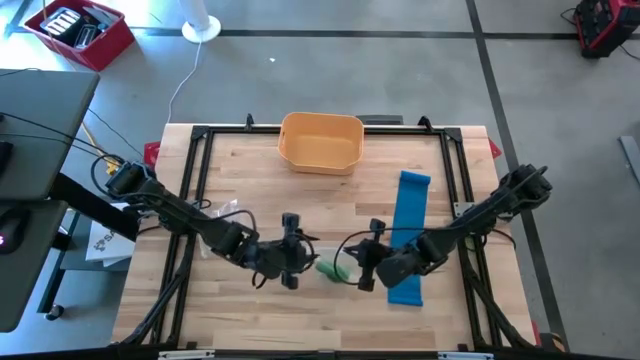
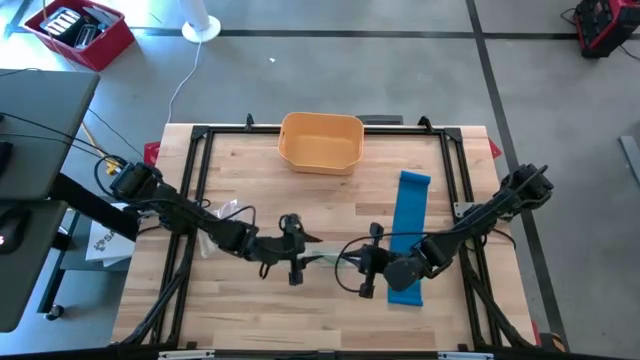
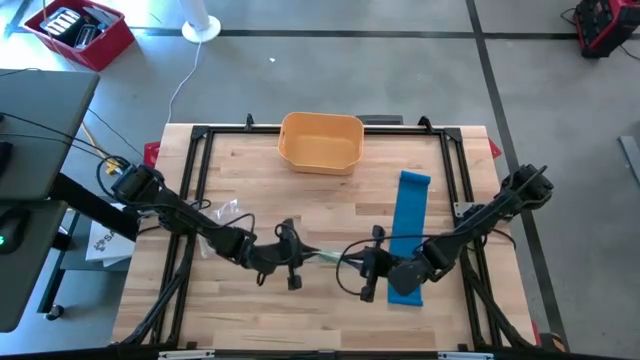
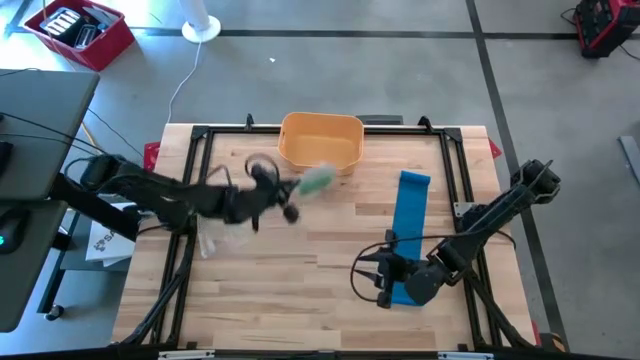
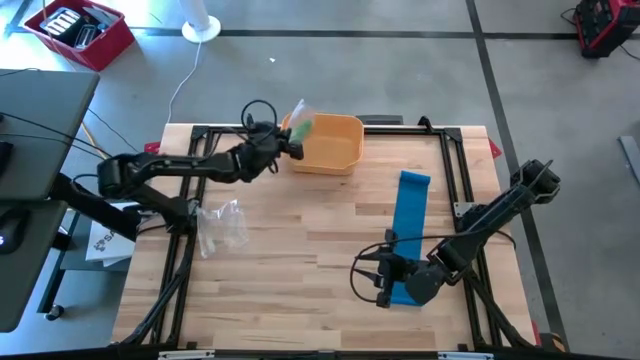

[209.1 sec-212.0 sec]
Task: Roll bandage
Put the zip bag into the yellow bin

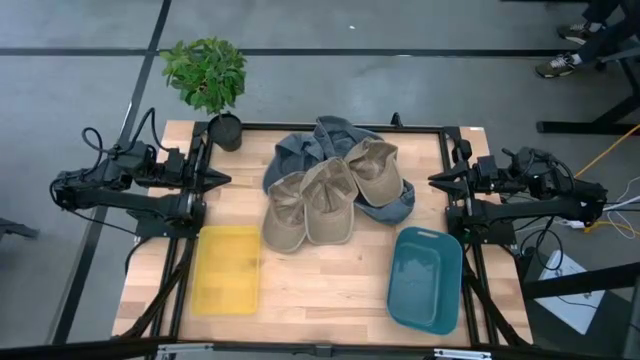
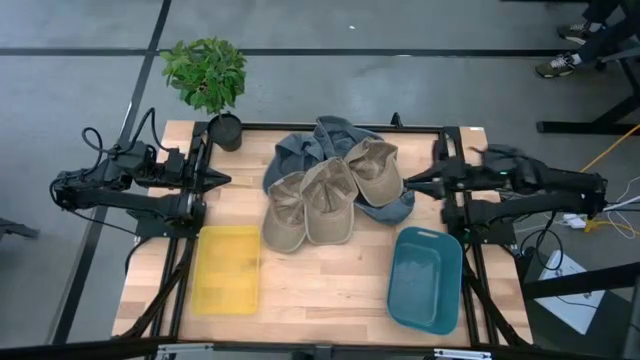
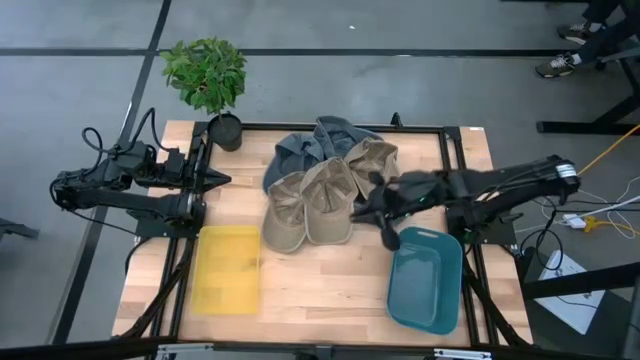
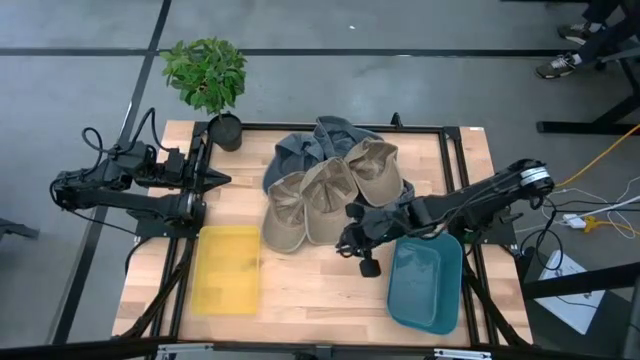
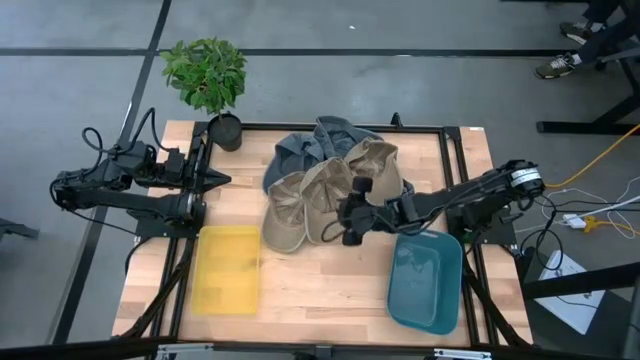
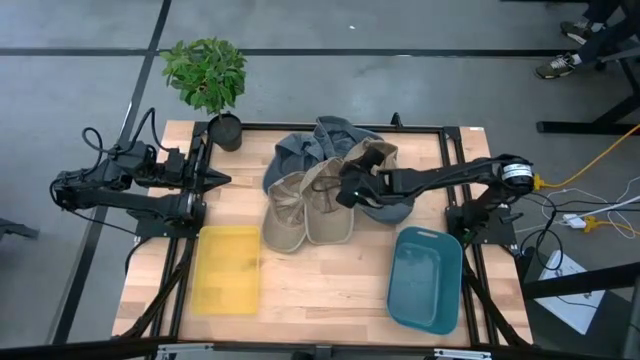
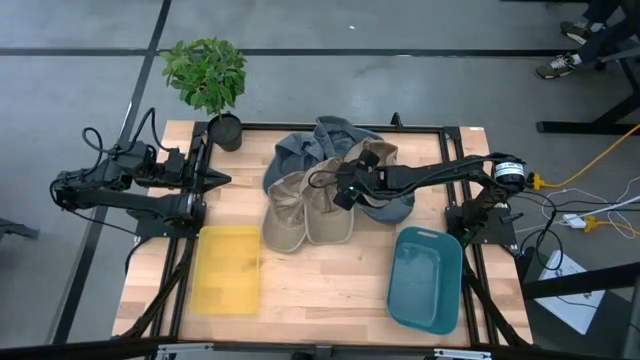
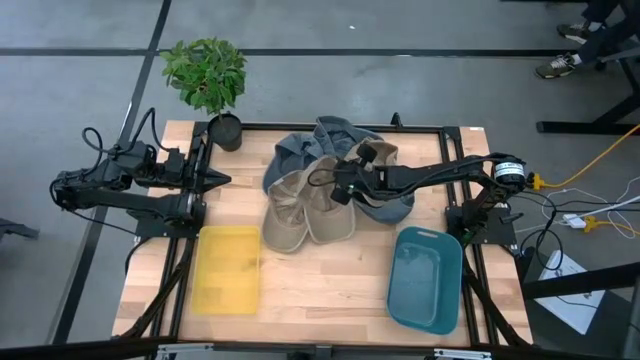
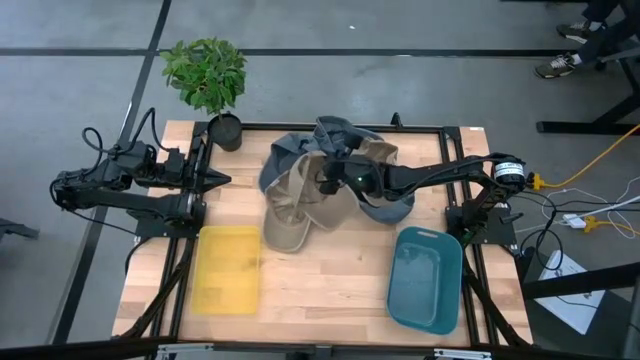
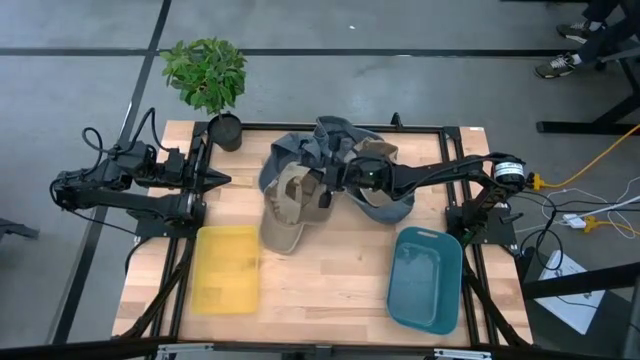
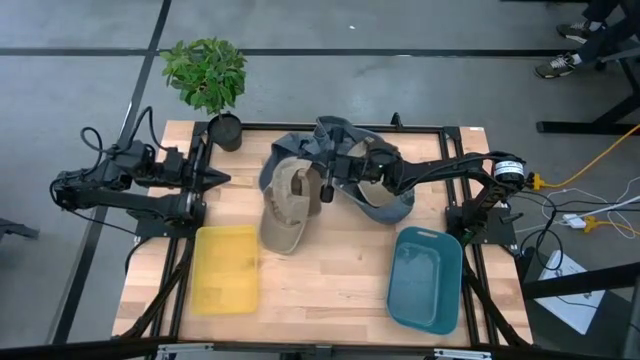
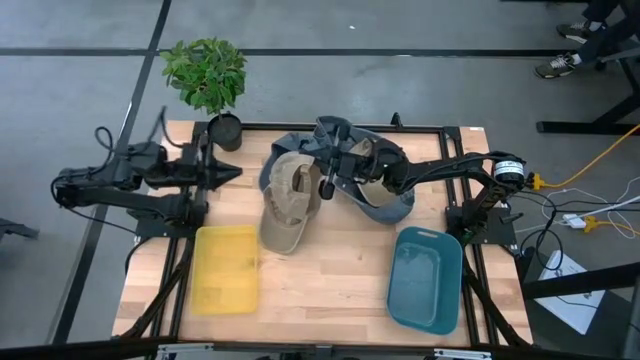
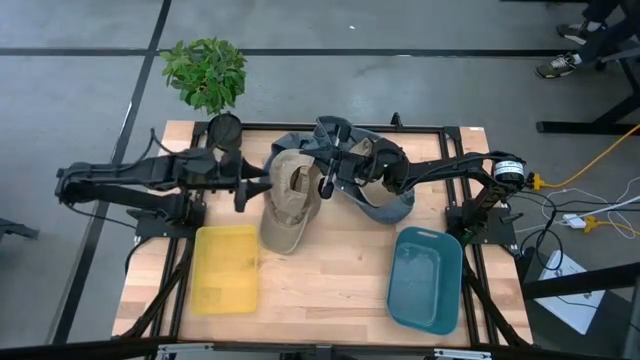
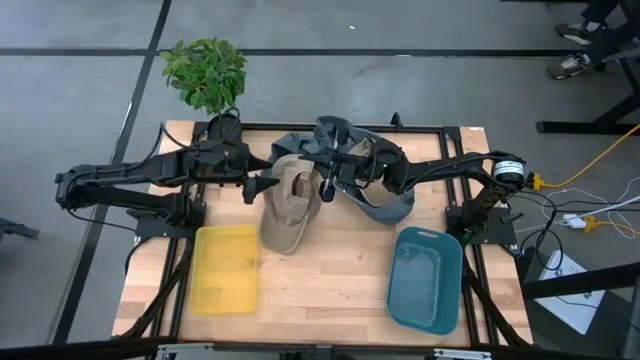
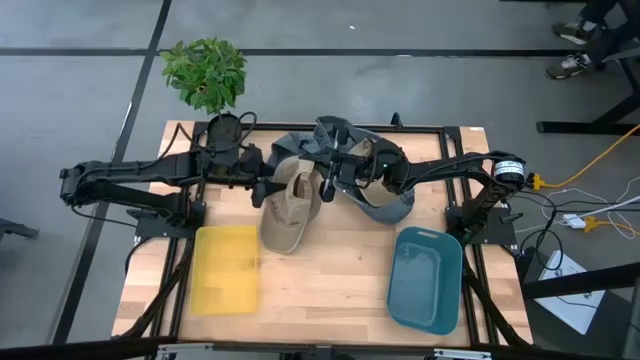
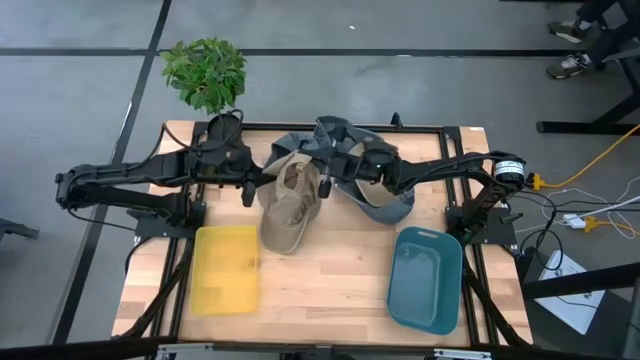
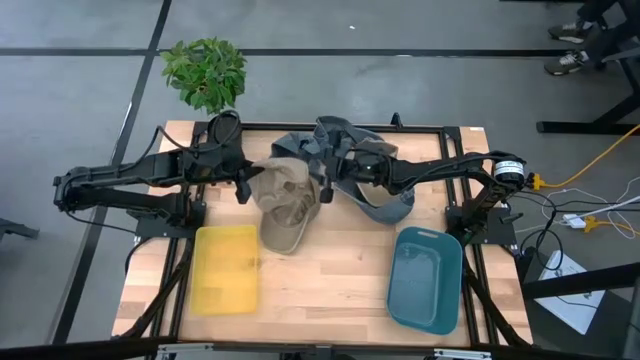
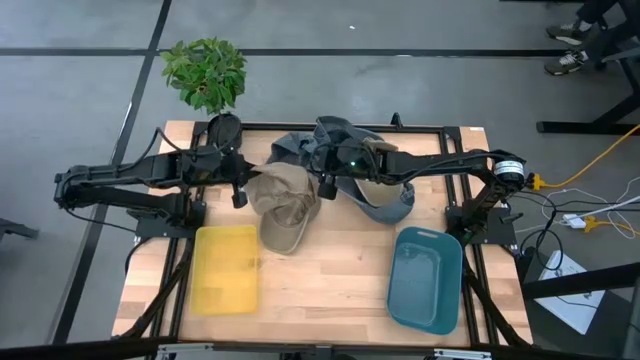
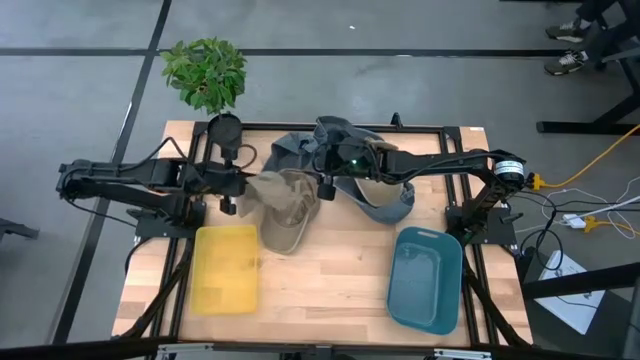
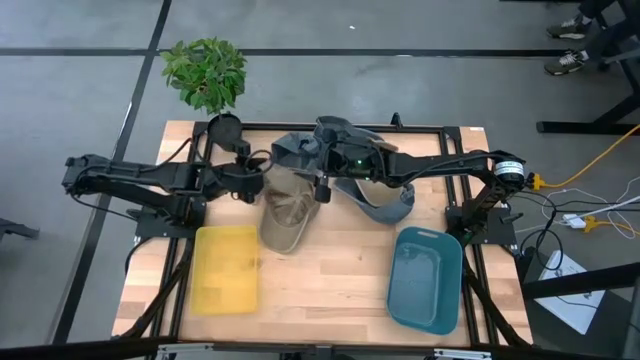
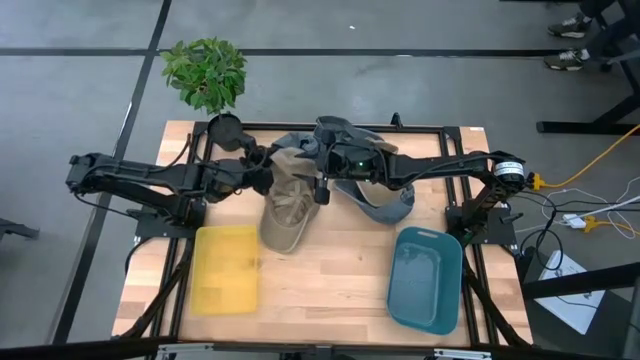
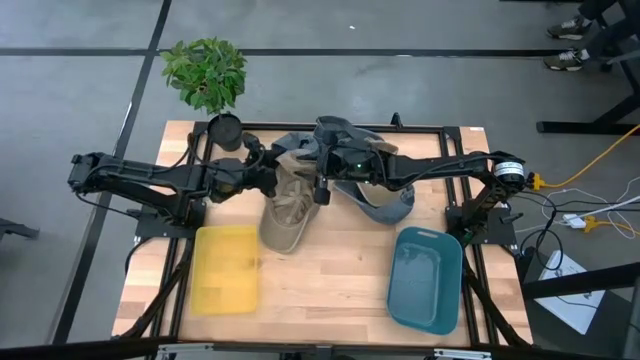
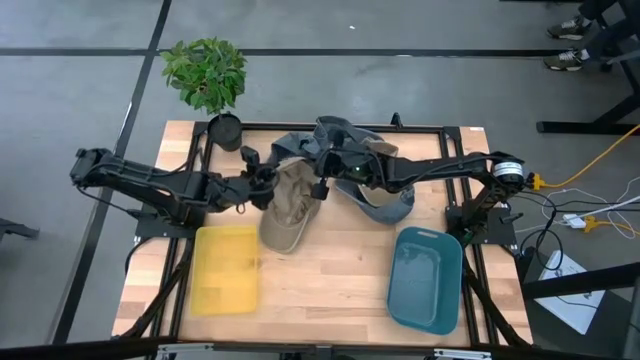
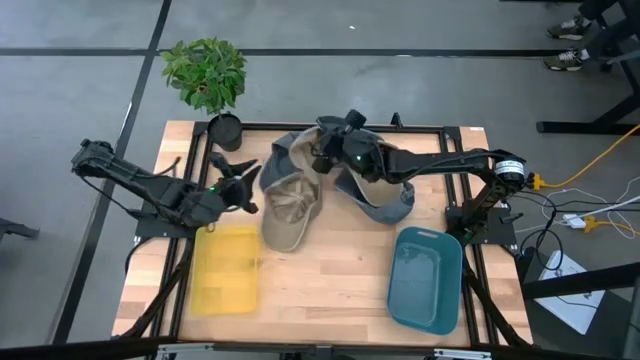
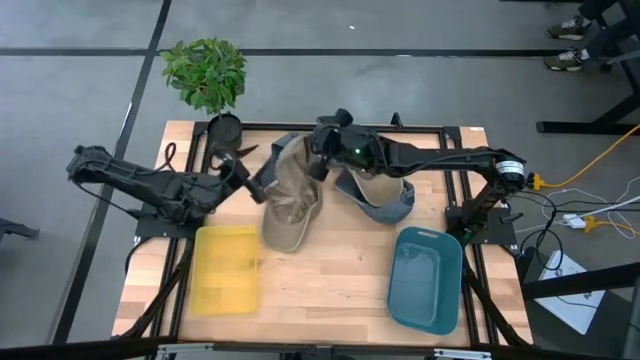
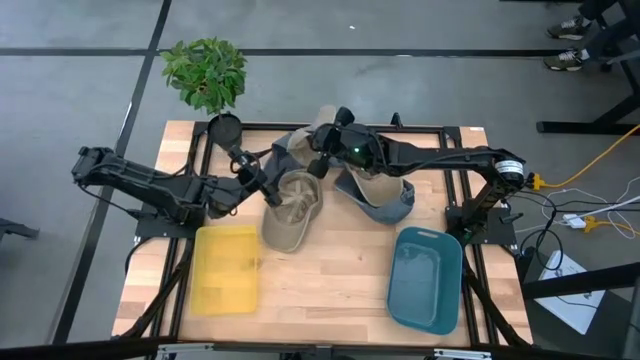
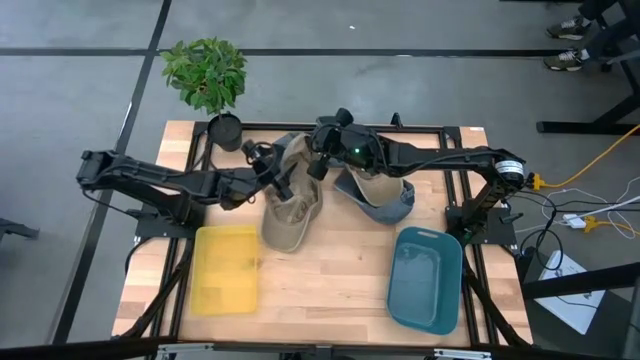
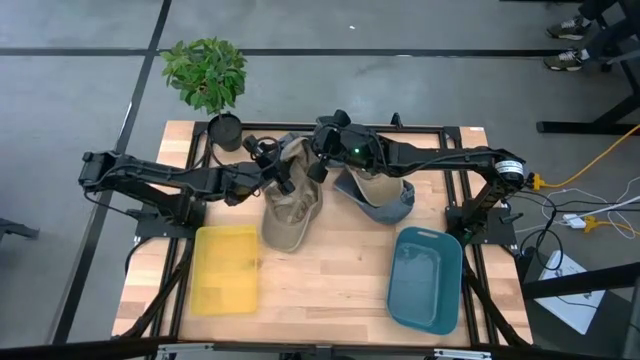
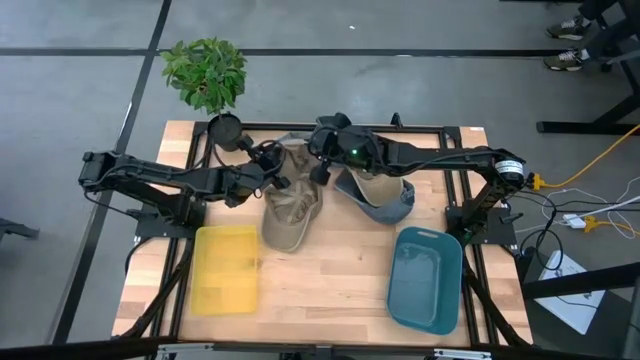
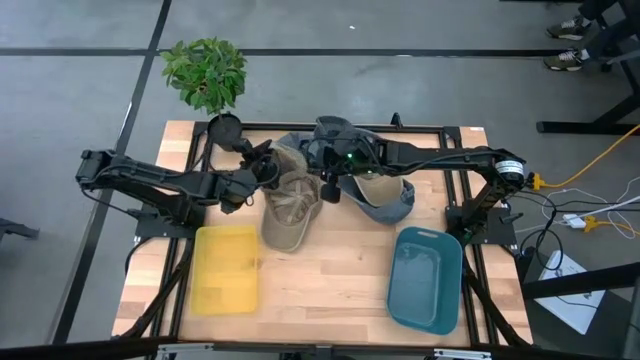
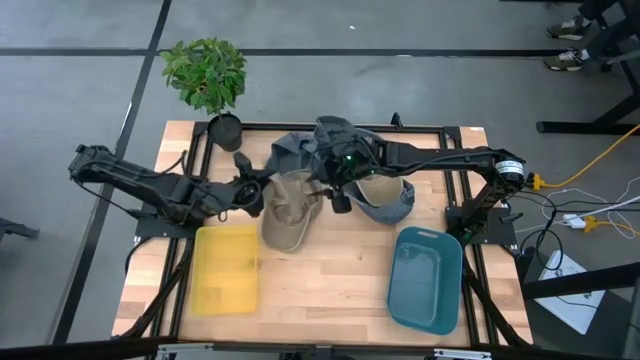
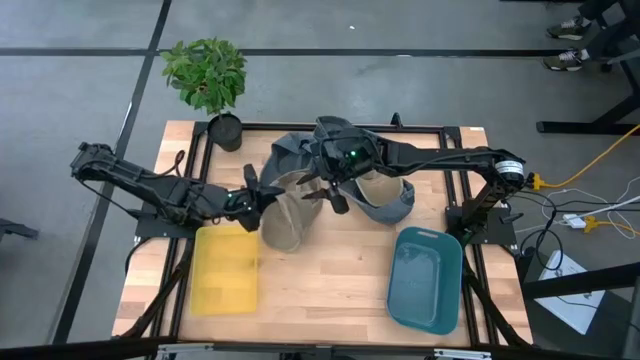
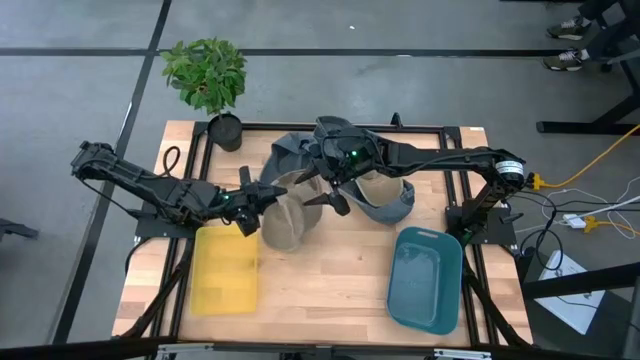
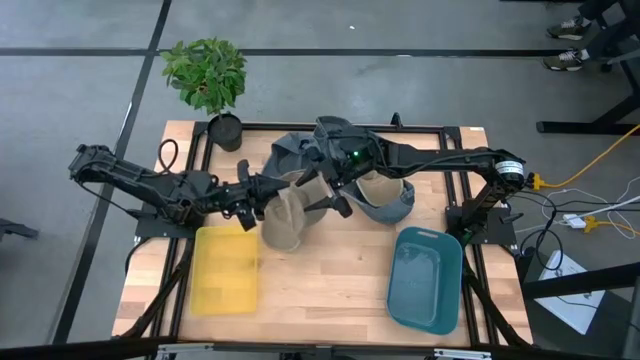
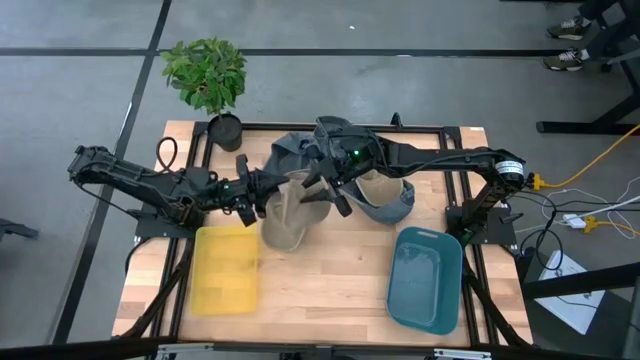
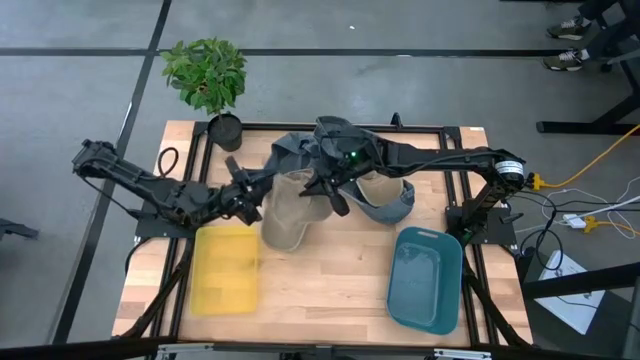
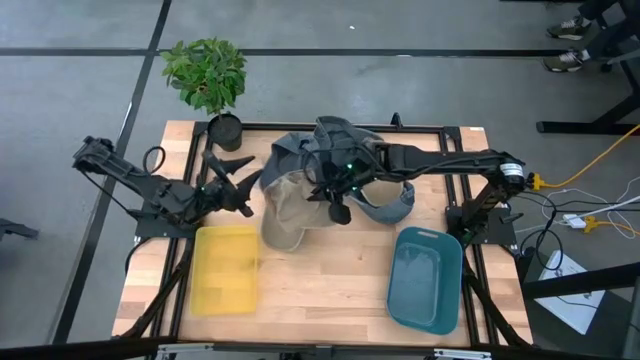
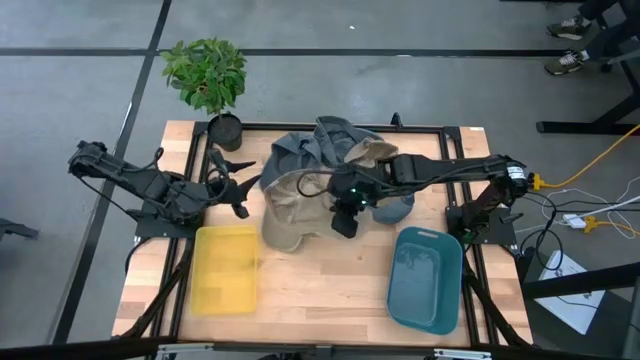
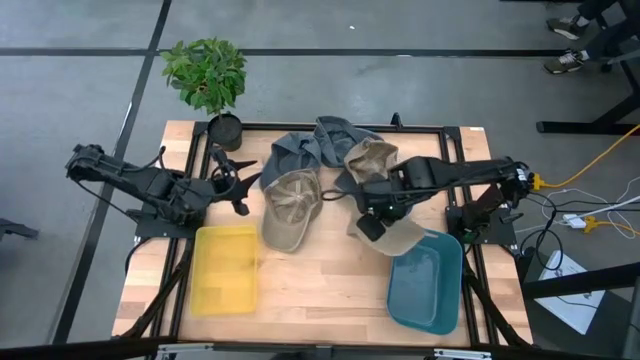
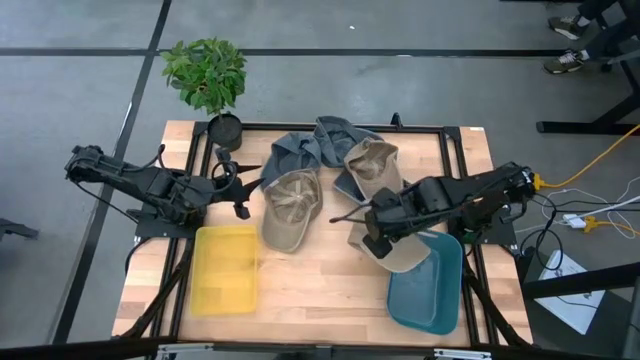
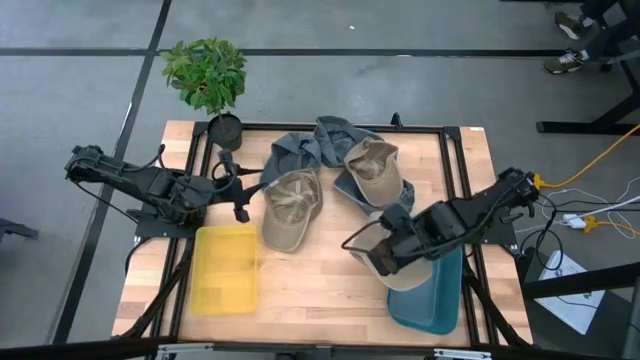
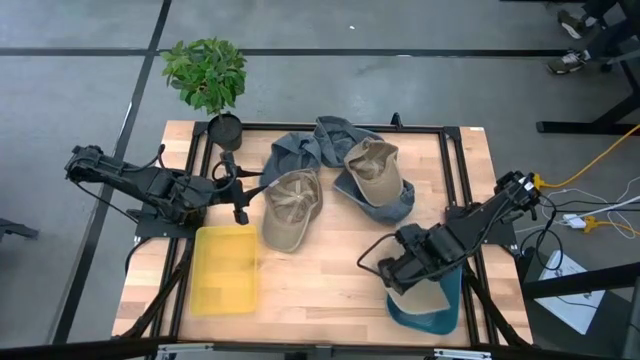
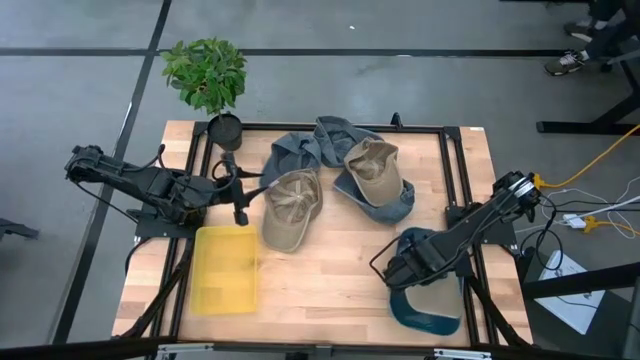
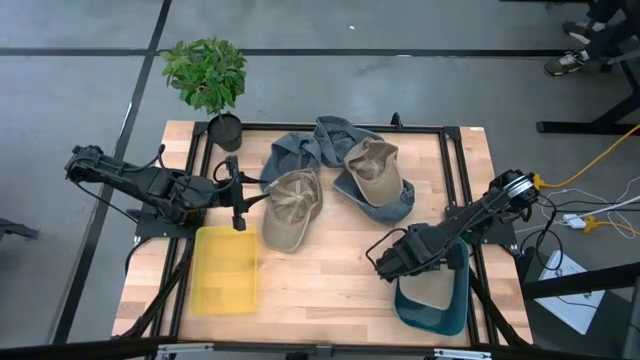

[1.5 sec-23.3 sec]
Task: Pick & Place hat
Put the middle brown cap into the blue bin
